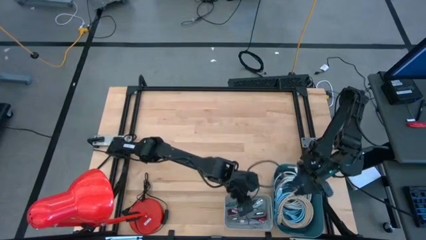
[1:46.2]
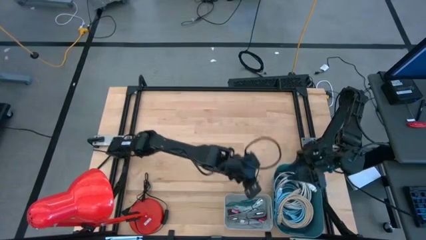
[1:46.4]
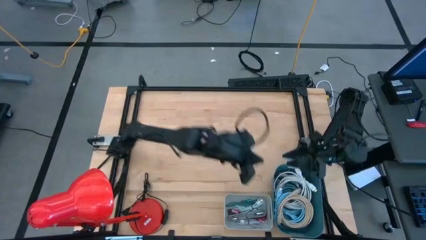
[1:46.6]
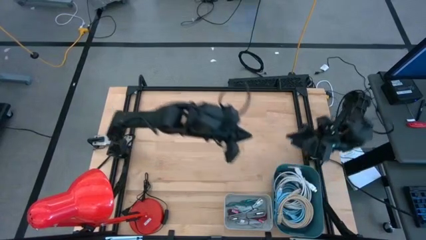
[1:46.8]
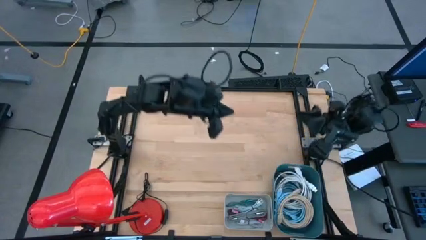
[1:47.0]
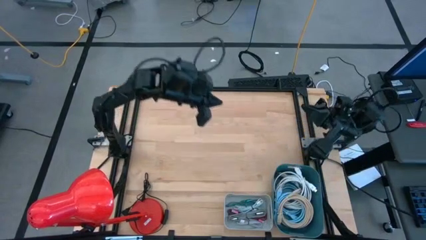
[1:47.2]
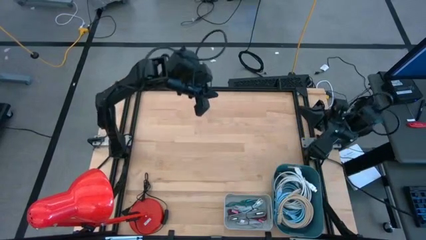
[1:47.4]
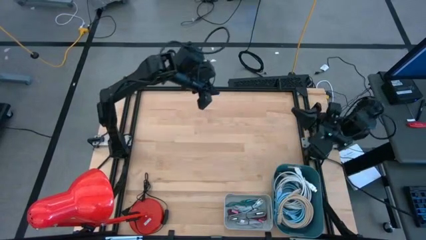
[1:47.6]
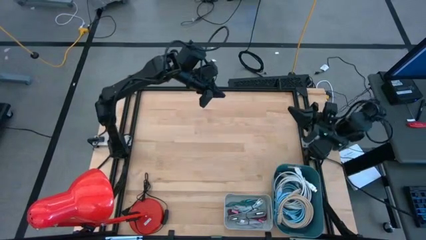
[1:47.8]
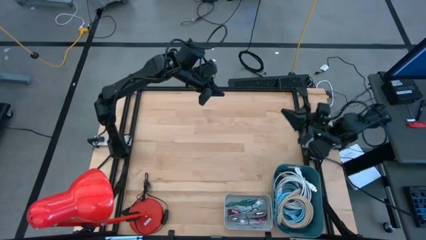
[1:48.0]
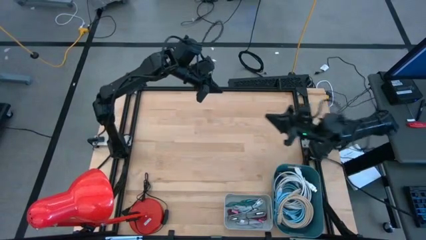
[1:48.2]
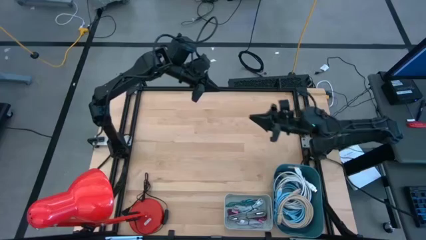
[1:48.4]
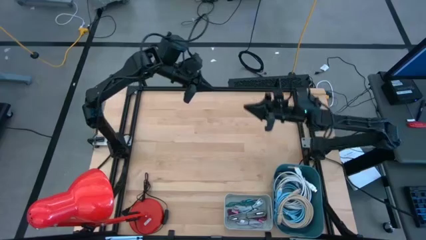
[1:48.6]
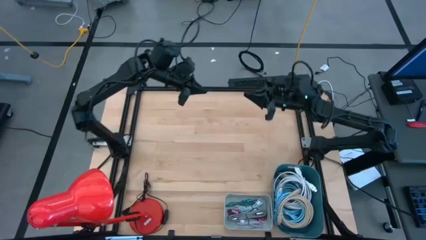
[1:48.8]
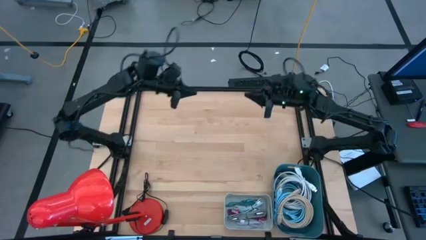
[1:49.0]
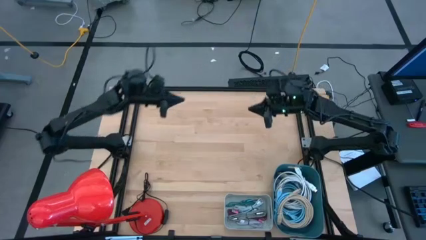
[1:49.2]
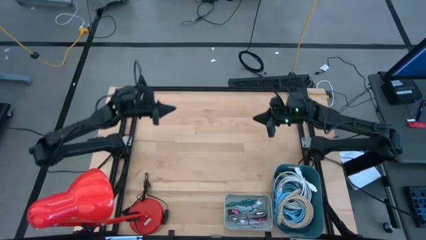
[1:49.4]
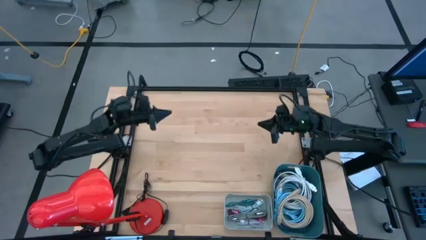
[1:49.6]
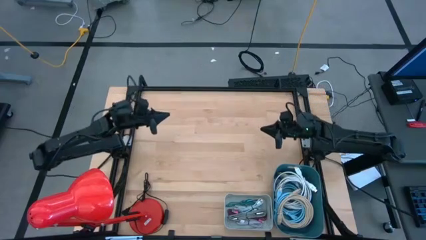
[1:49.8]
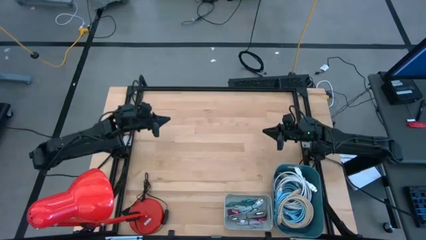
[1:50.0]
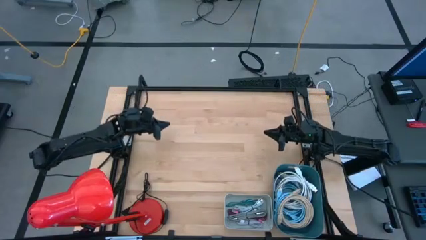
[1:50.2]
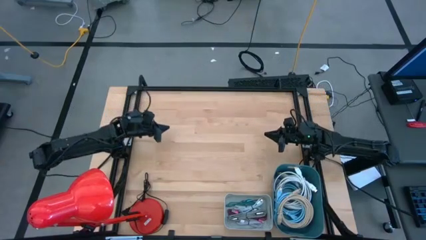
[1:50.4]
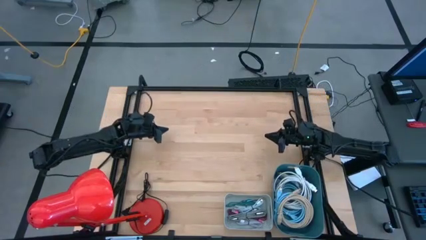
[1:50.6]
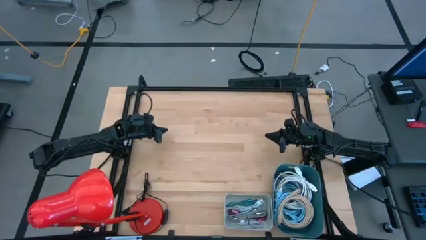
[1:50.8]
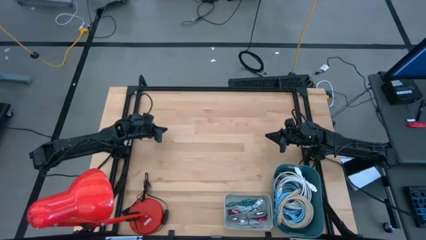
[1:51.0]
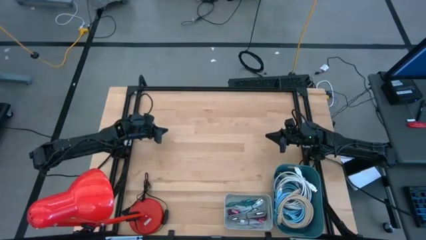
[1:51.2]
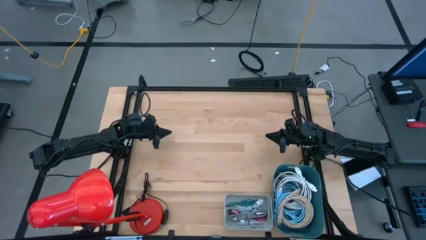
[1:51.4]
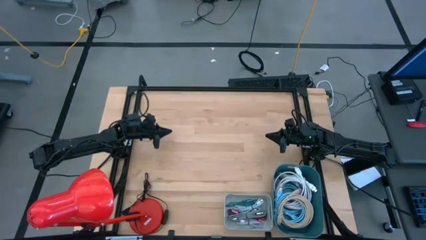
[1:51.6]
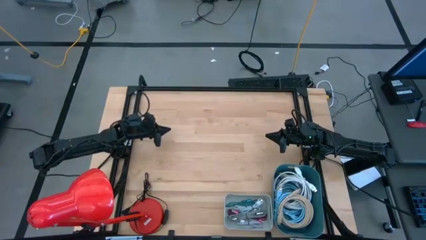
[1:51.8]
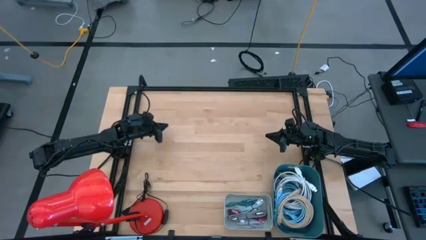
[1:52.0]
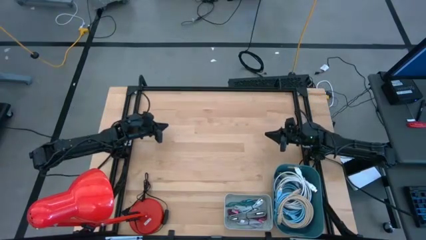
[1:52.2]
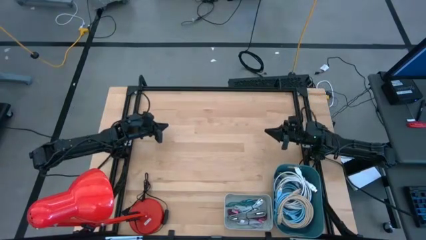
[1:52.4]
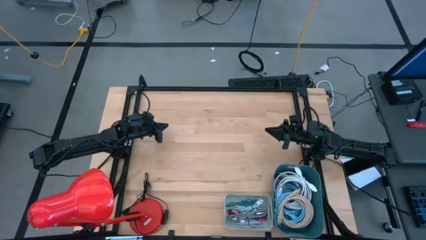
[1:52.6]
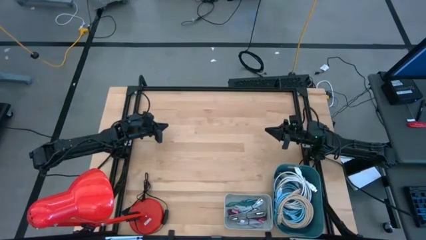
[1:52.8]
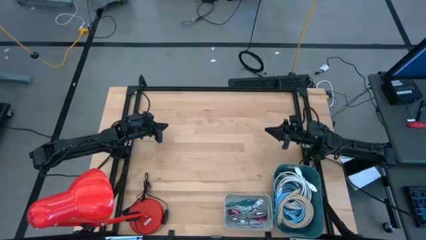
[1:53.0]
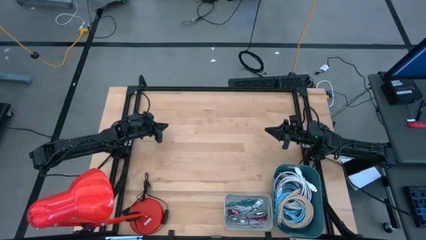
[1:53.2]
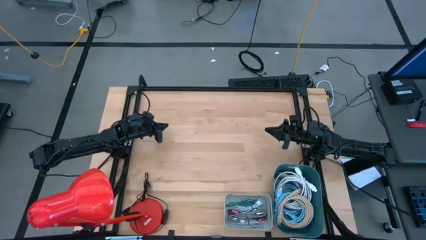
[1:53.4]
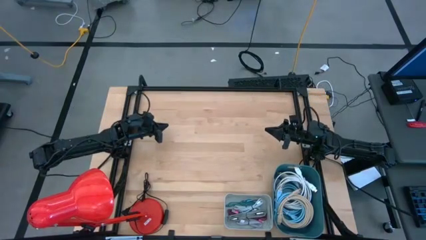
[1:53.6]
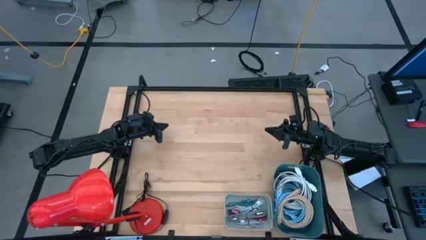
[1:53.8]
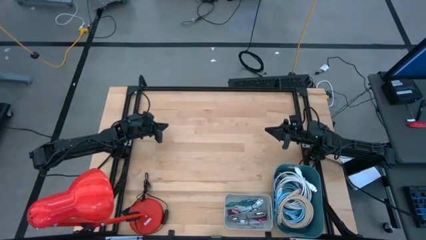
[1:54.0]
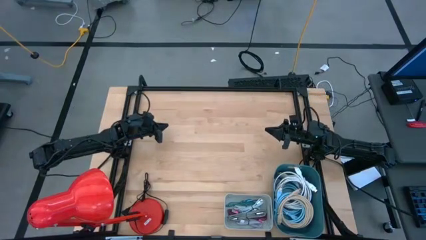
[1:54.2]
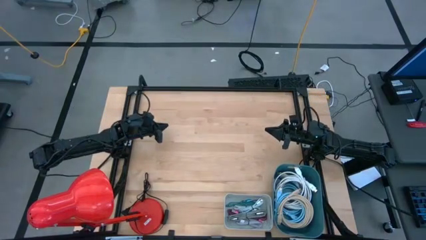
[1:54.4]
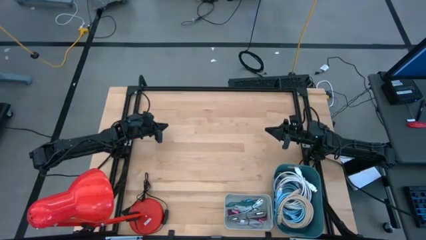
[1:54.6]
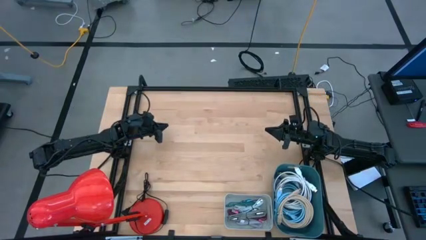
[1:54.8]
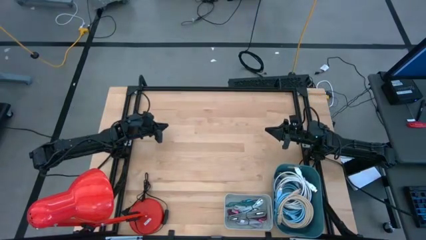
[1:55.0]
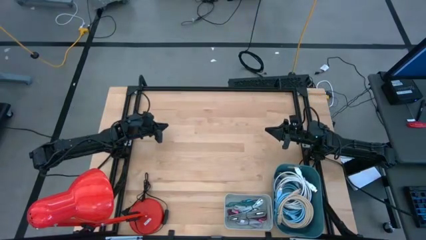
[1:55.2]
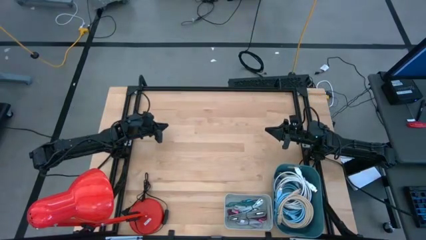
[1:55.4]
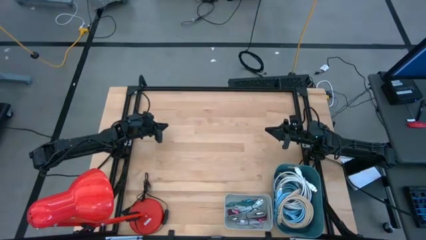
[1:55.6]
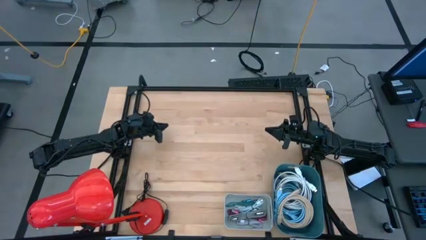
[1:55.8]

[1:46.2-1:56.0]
Task: Pick & Place USB Port
Return to Home Position

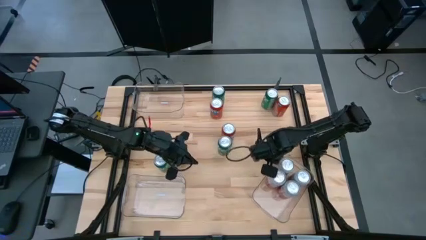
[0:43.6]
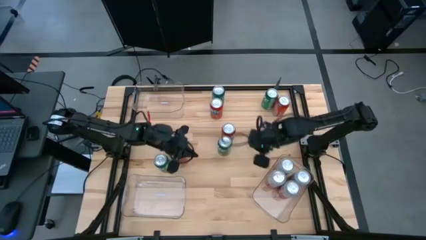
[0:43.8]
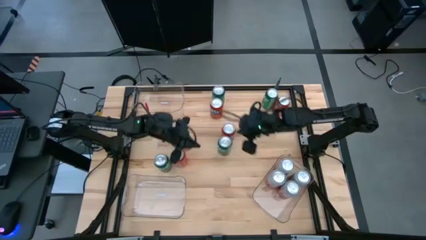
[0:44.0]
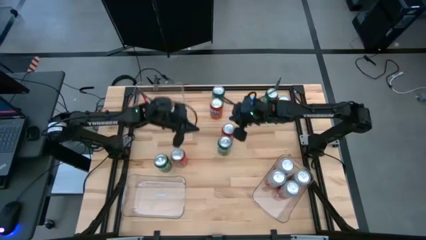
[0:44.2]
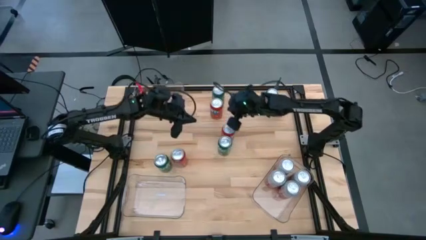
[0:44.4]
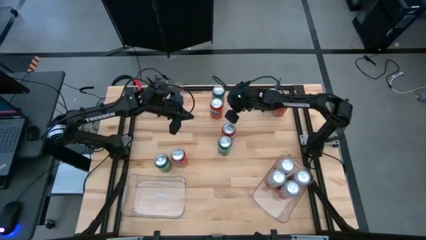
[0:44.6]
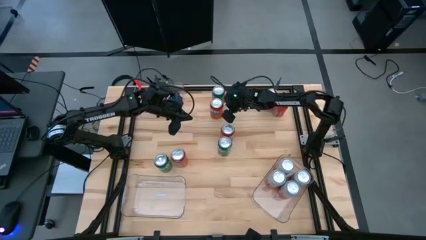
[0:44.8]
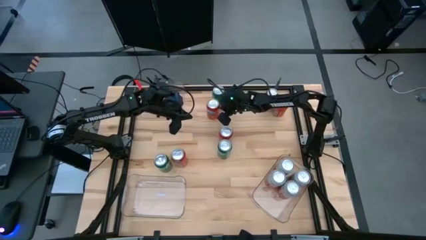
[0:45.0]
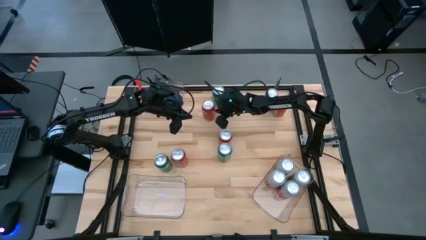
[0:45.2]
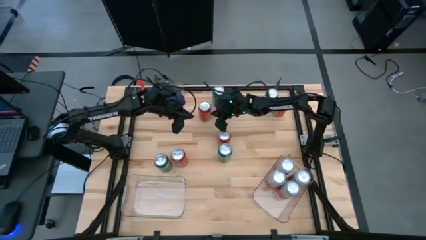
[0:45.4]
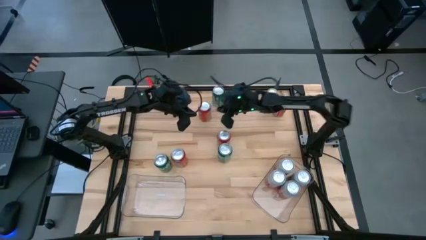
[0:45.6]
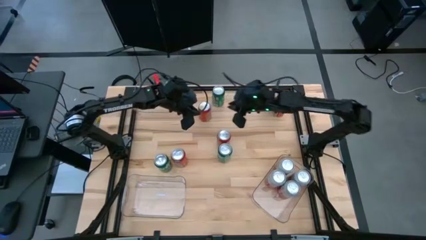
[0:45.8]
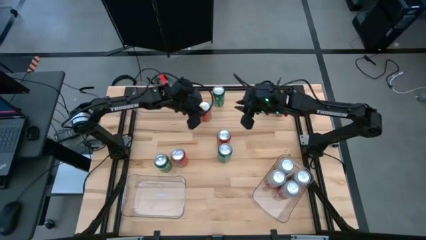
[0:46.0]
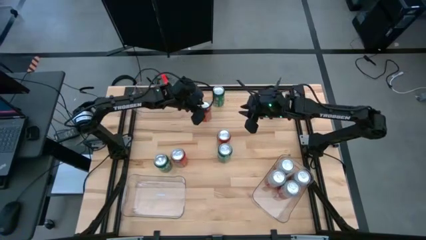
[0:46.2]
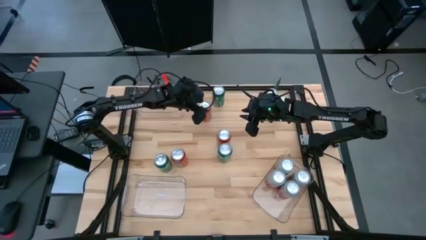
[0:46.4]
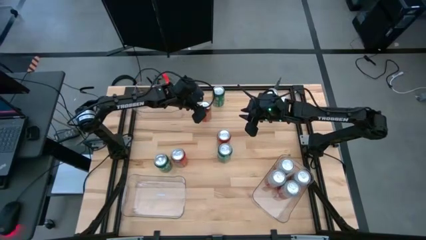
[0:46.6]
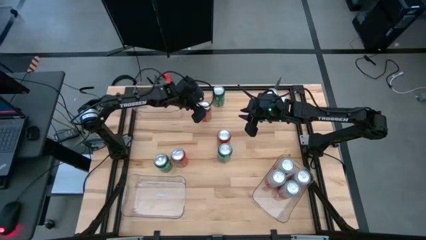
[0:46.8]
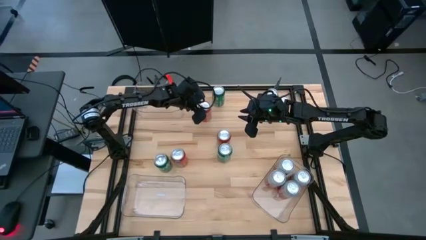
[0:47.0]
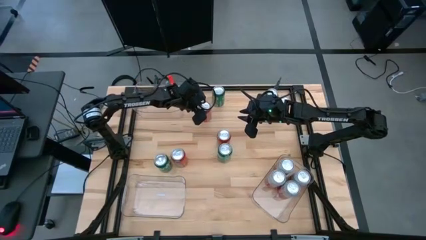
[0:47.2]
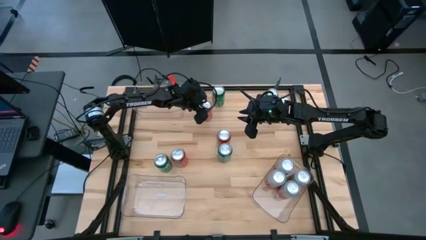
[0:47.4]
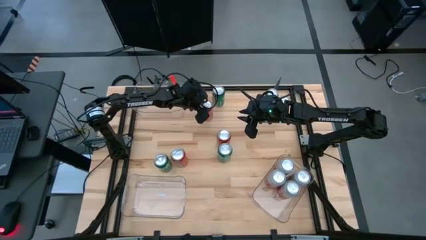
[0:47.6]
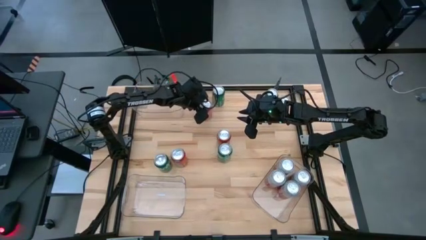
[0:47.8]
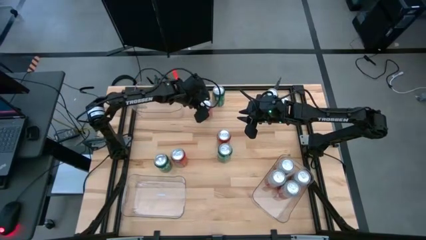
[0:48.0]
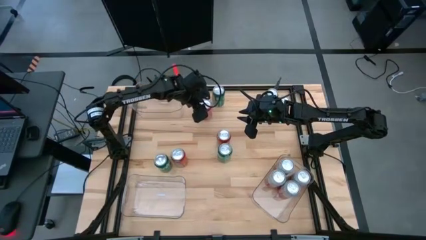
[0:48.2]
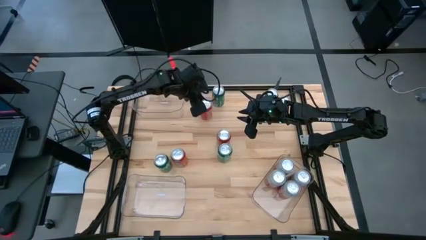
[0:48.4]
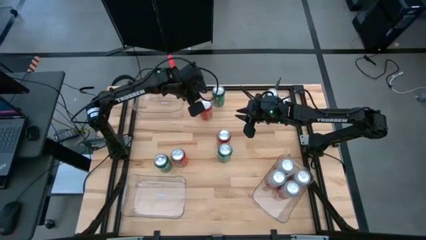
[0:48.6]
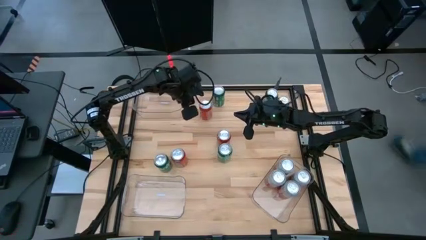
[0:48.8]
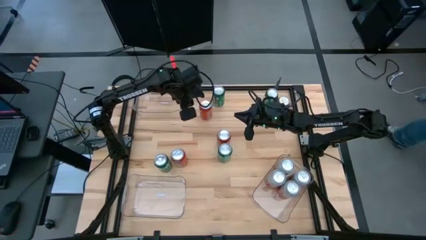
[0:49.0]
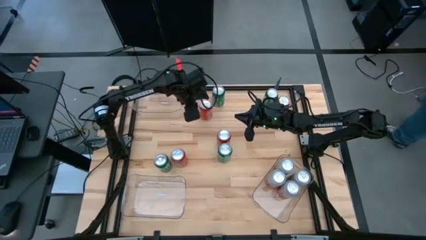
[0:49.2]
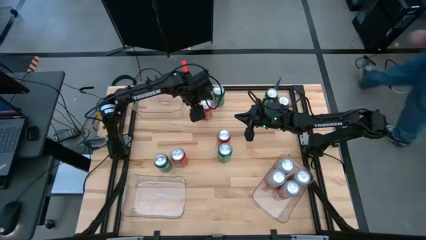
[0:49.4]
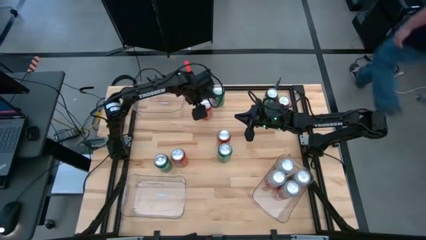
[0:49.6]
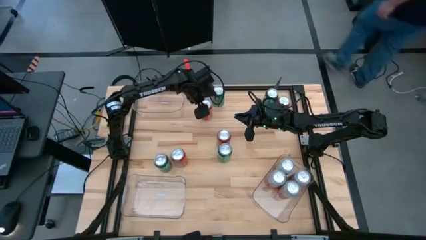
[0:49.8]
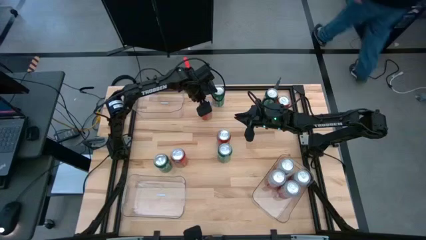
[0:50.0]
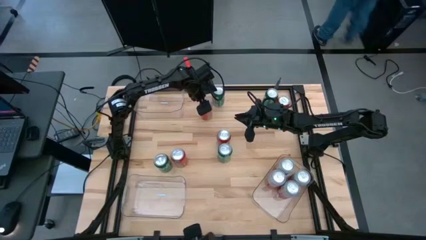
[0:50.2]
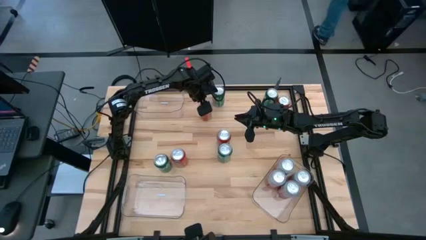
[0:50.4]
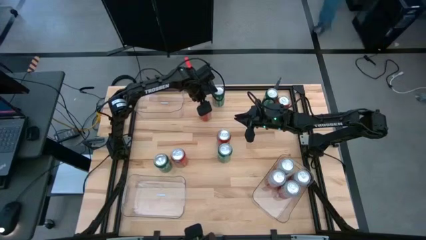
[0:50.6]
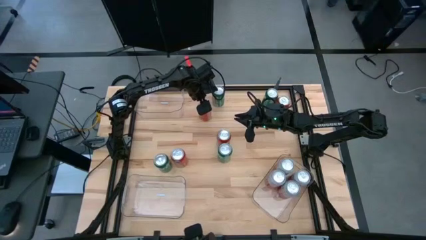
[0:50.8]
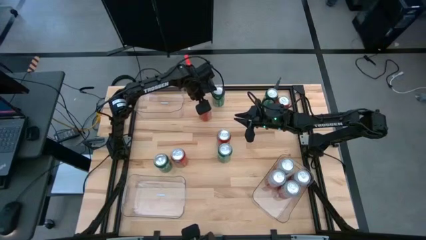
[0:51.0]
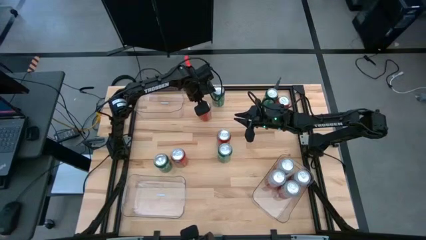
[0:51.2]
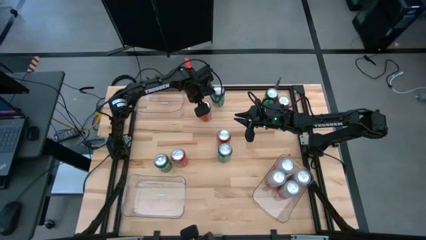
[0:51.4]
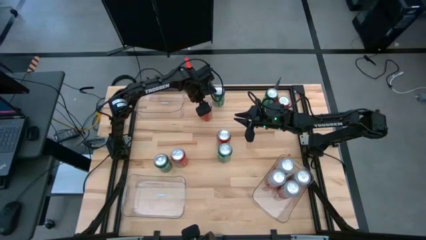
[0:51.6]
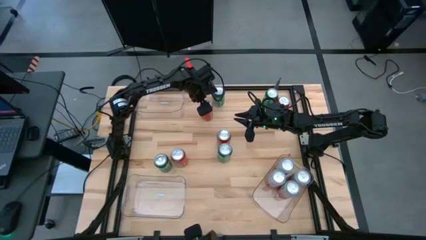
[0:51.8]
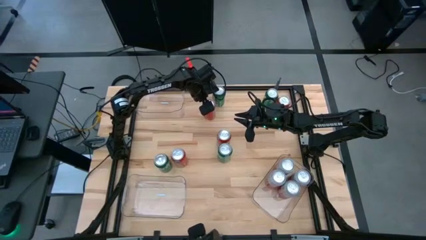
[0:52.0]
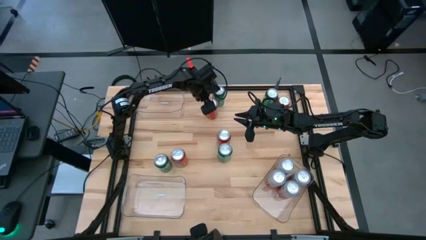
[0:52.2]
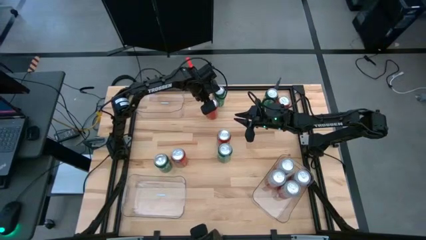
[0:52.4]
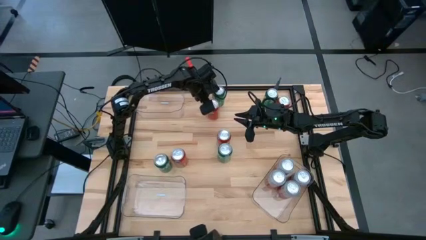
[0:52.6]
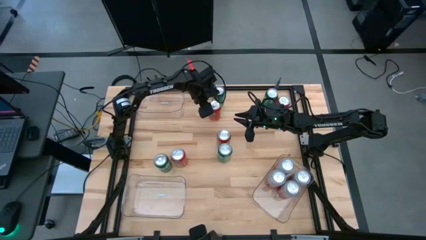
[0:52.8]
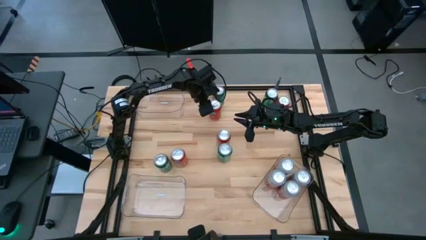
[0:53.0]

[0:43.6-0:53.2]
Task: Sort soda cans
Put the orange soda can into the top left transparent bin
